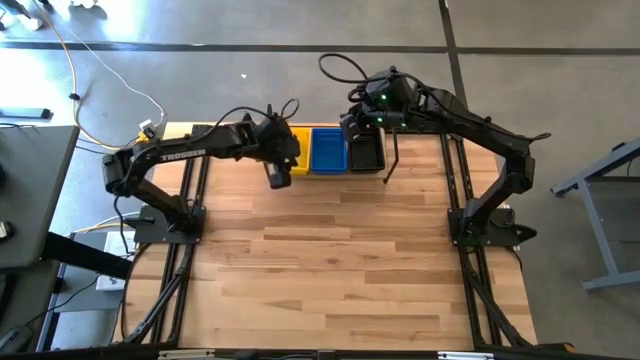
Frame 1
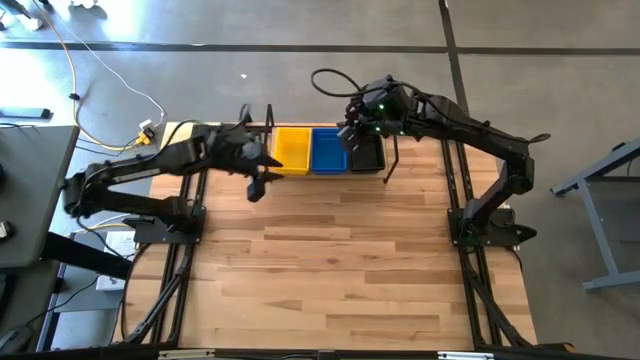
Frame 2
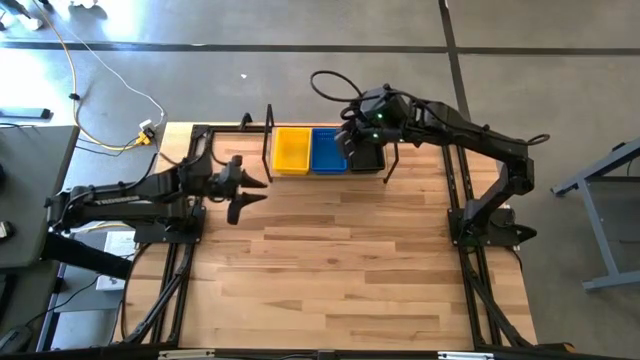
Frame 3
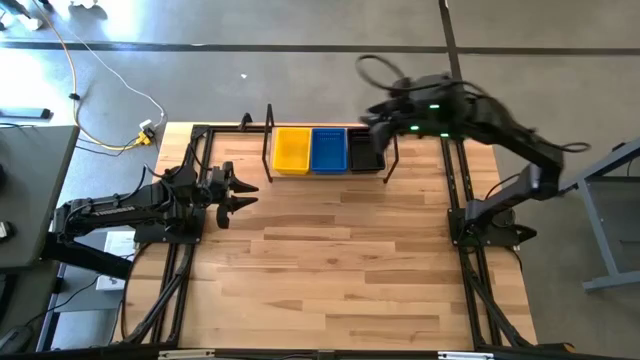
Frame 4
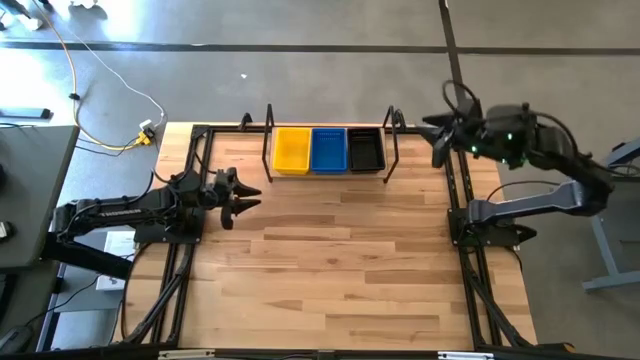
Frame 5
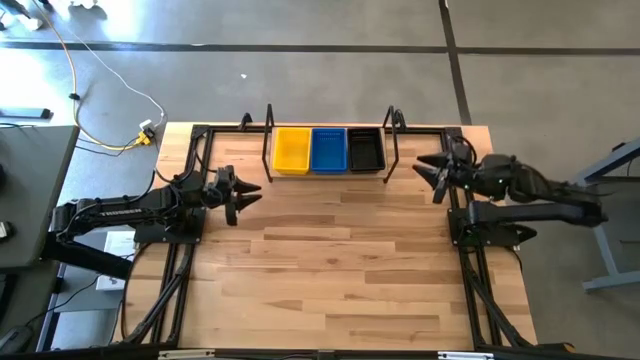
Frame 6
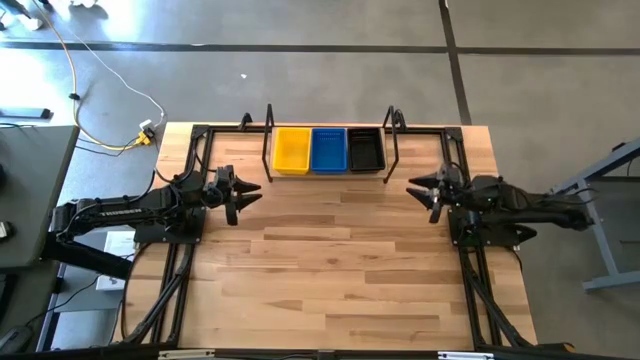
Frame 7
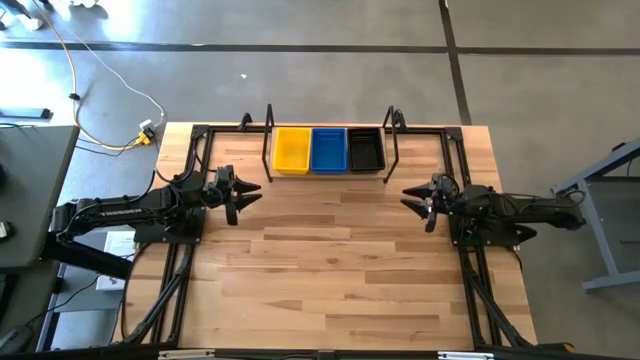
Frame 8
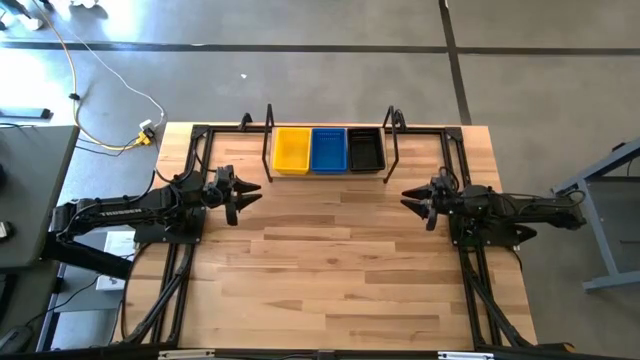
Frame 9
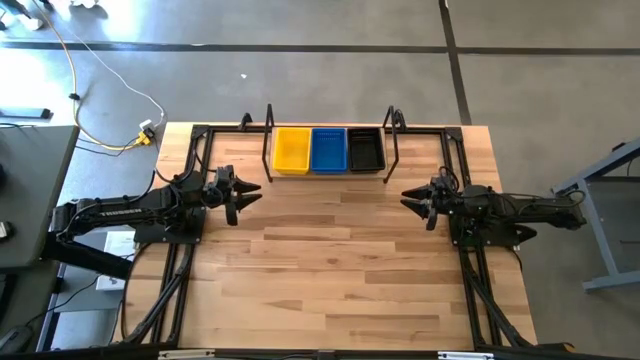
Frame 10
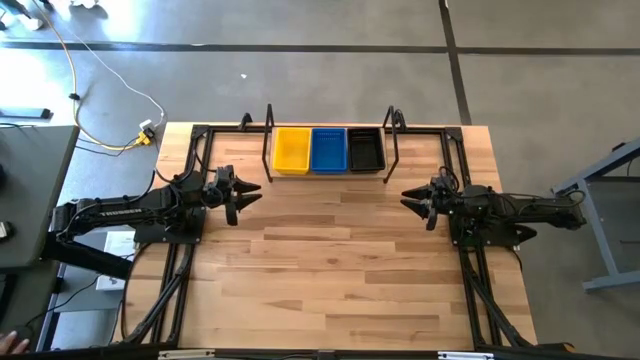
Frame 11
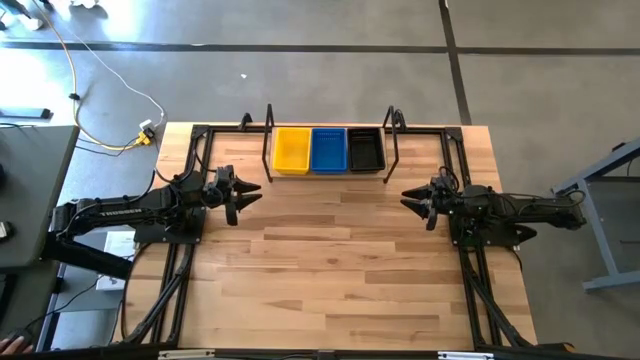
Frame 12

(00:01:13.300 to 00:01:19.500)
Task: Stack baskets on shelf by color
Return to Home Position

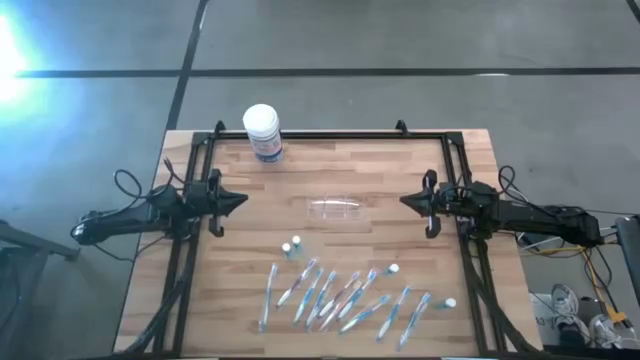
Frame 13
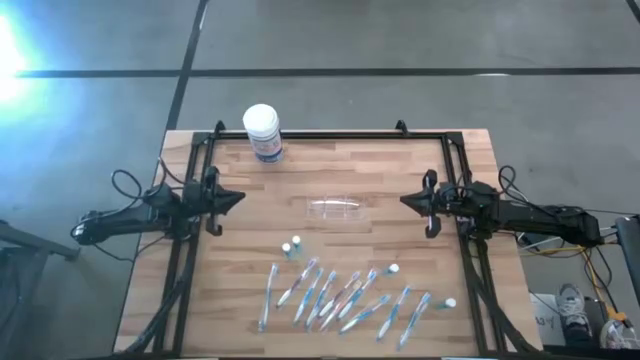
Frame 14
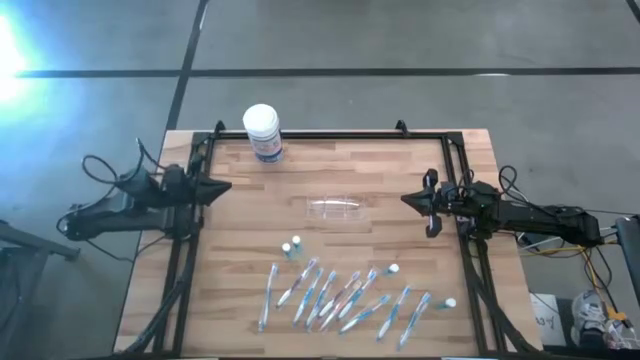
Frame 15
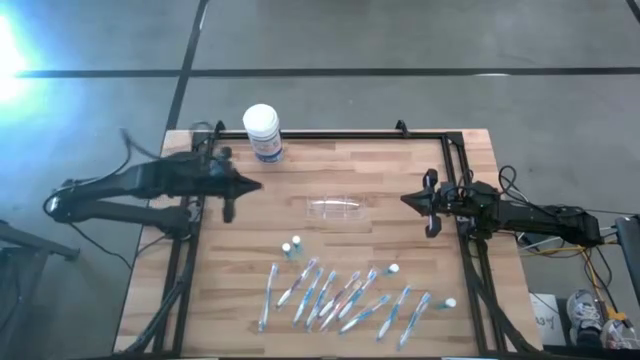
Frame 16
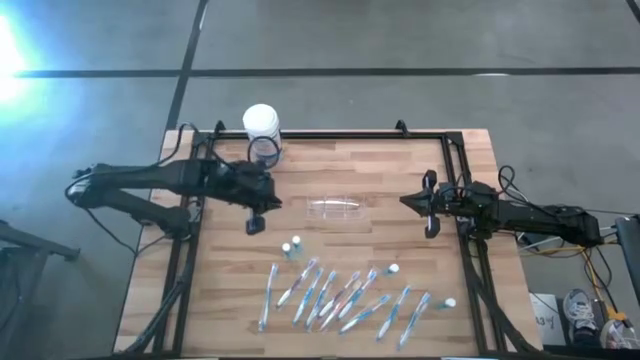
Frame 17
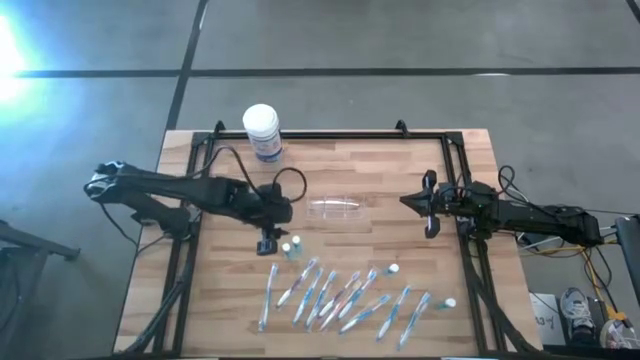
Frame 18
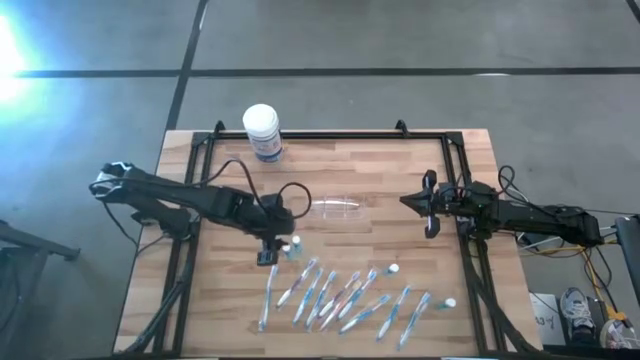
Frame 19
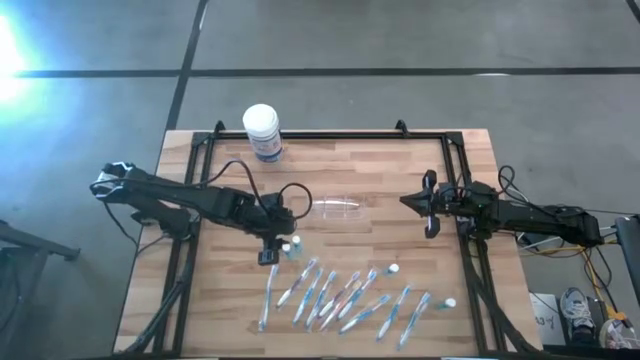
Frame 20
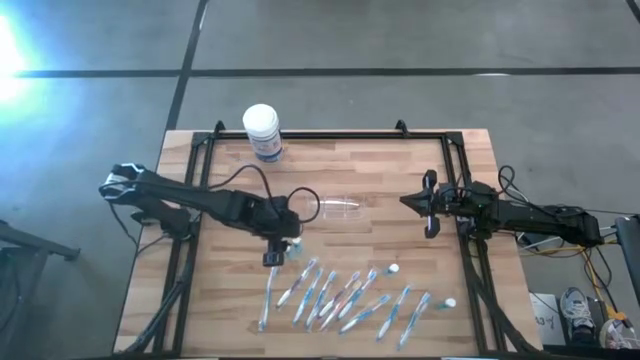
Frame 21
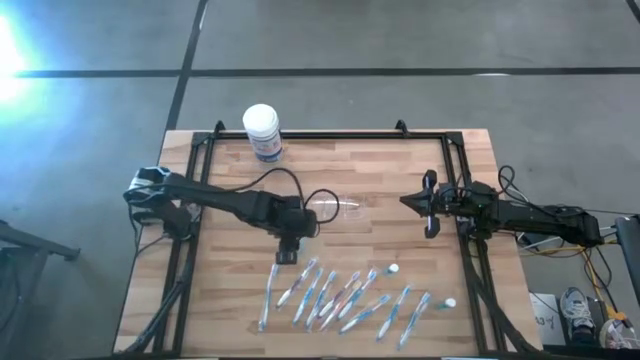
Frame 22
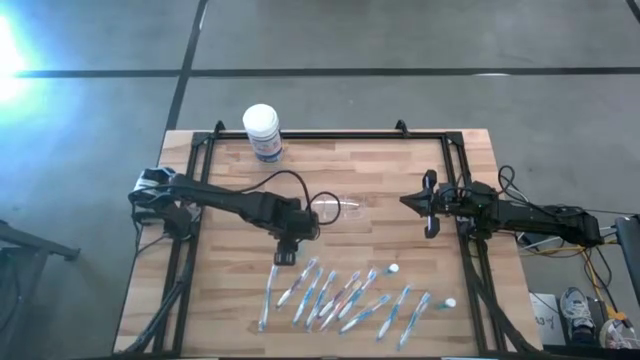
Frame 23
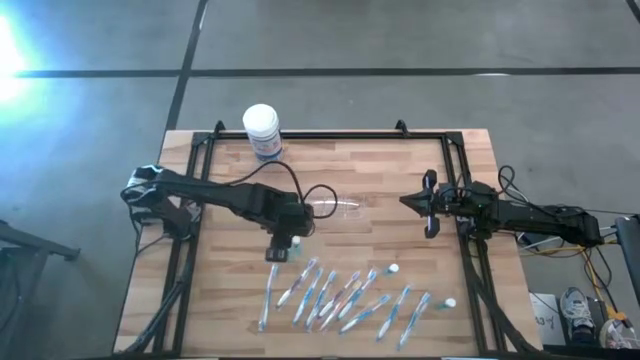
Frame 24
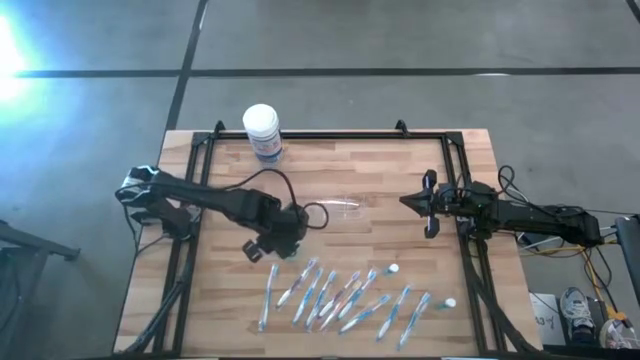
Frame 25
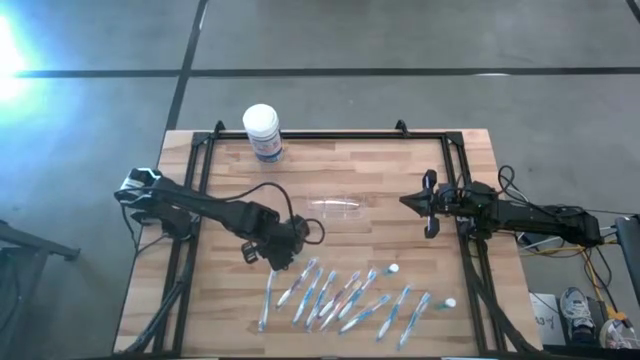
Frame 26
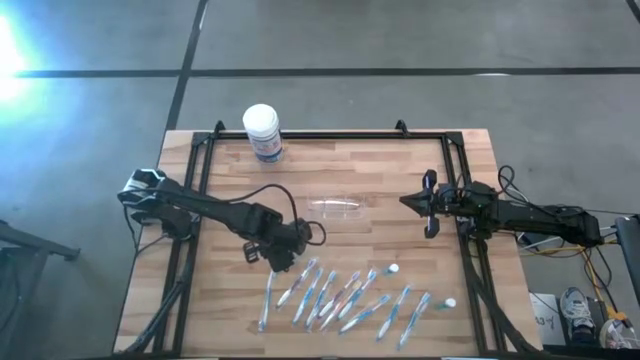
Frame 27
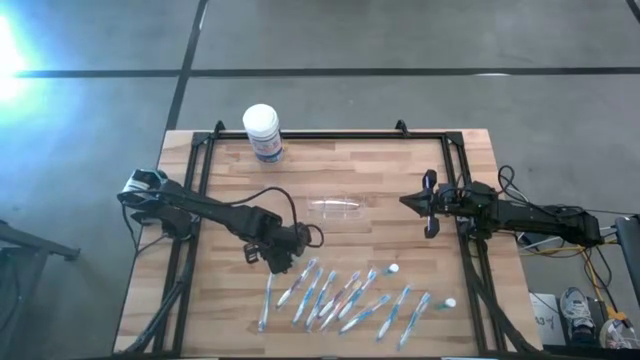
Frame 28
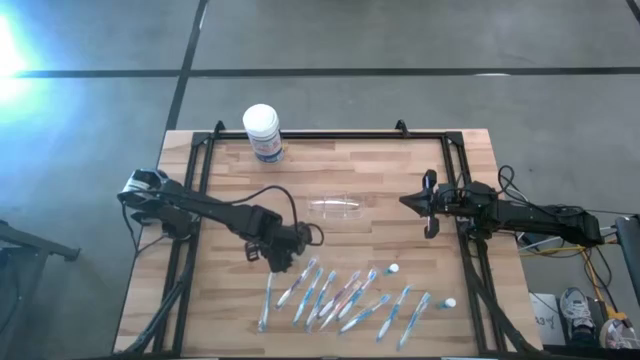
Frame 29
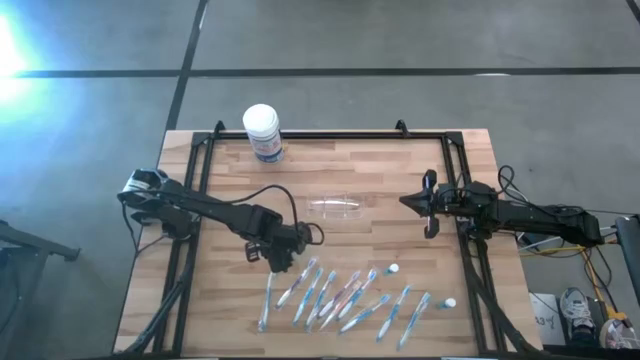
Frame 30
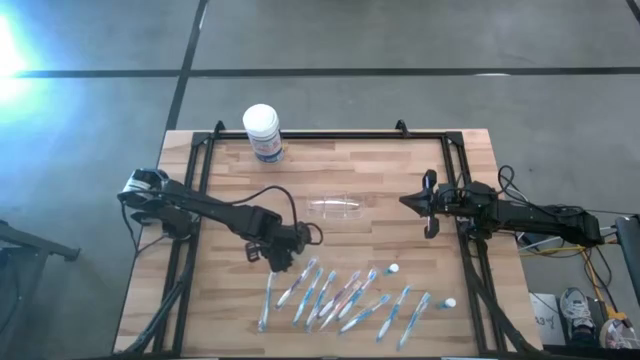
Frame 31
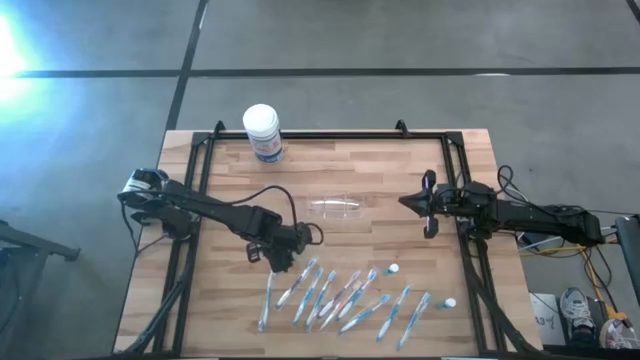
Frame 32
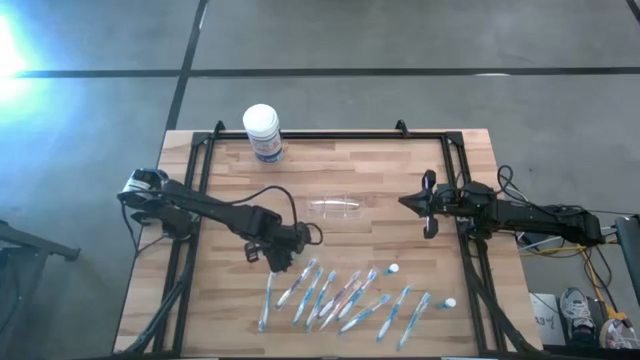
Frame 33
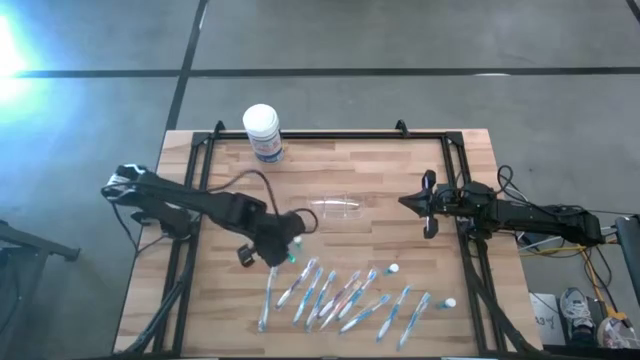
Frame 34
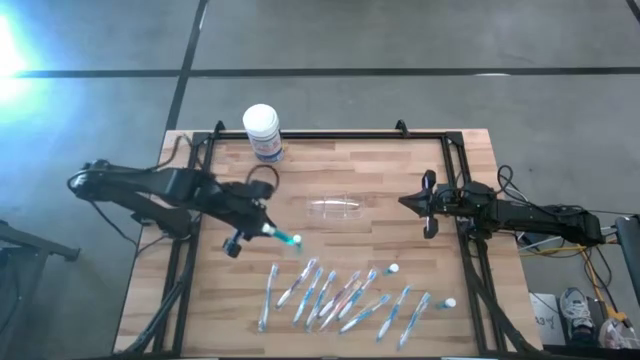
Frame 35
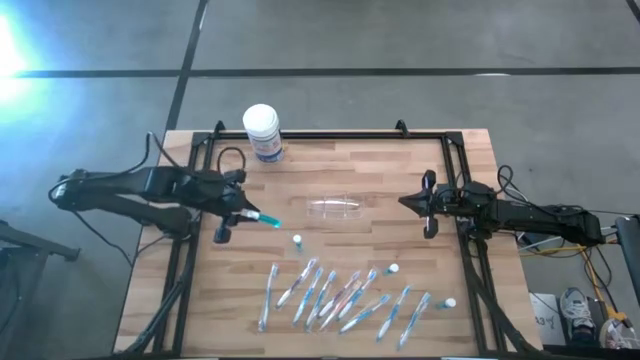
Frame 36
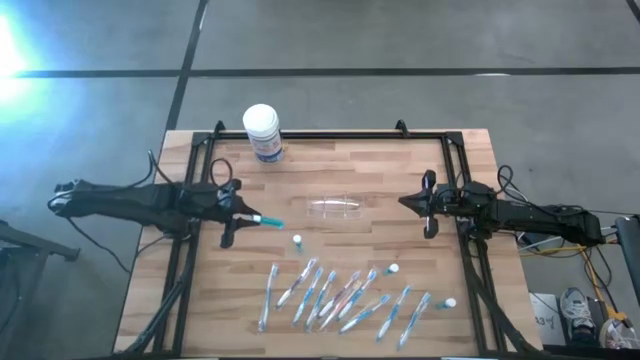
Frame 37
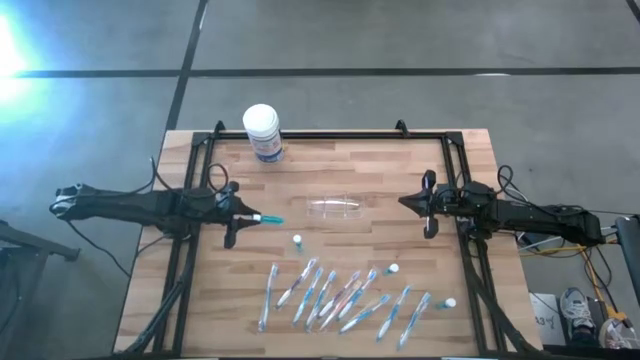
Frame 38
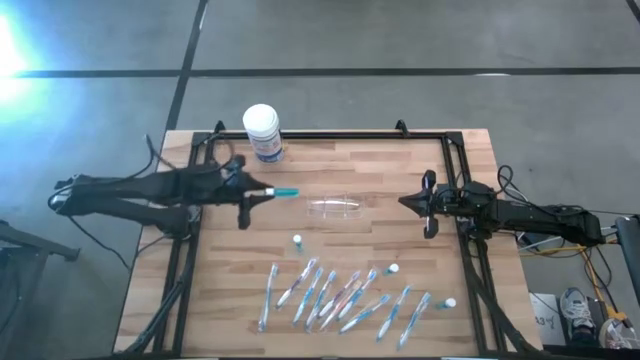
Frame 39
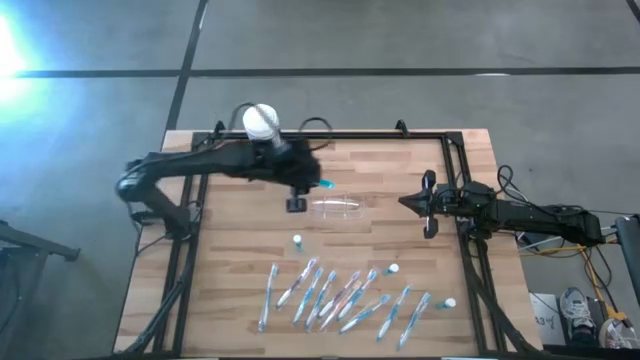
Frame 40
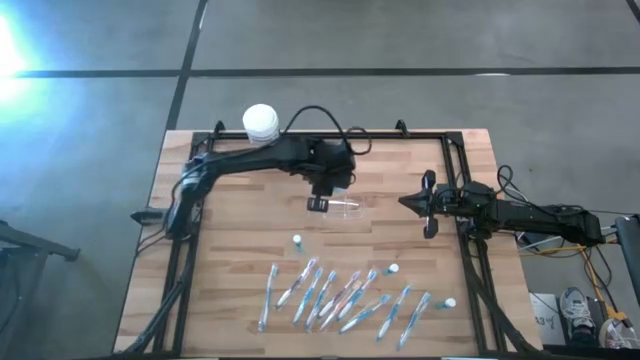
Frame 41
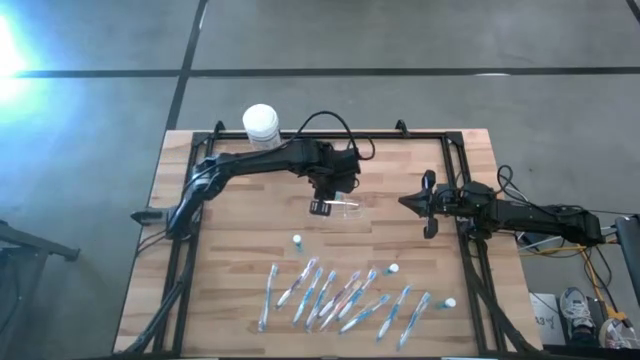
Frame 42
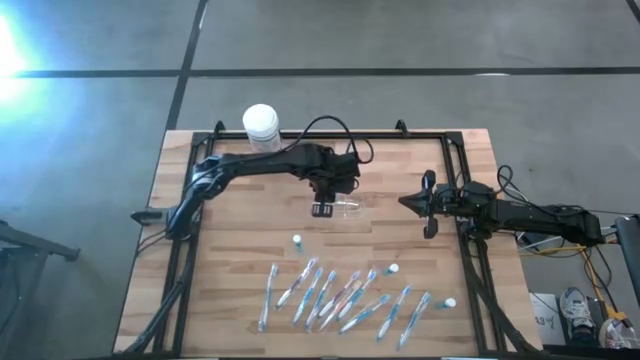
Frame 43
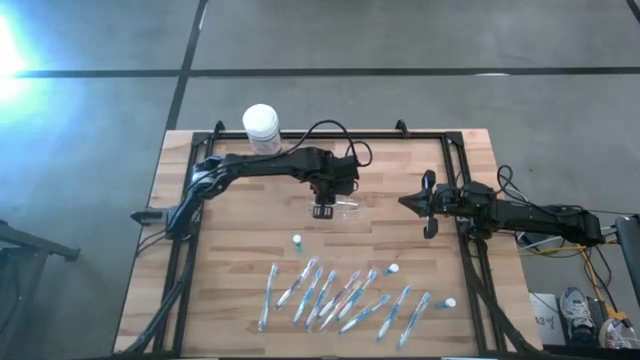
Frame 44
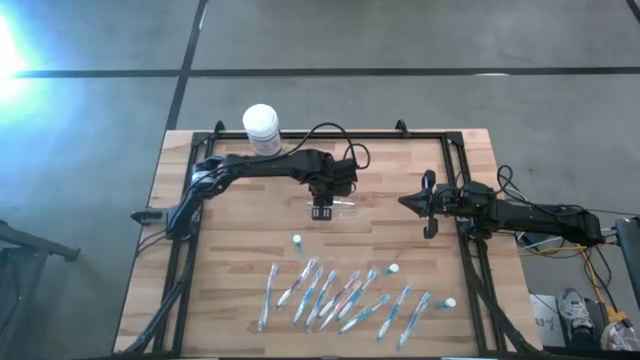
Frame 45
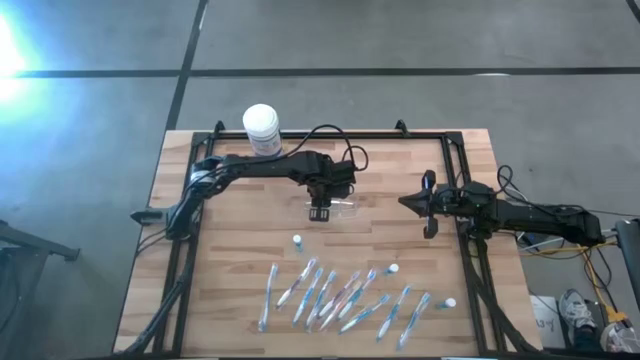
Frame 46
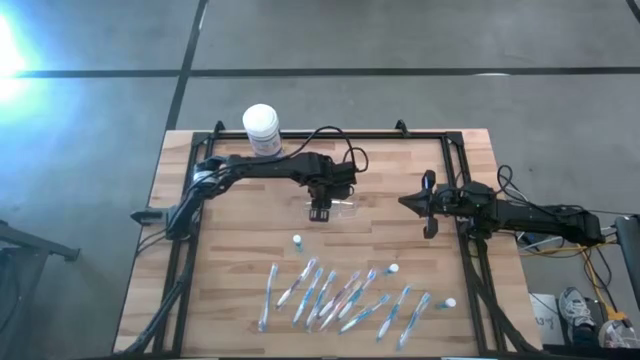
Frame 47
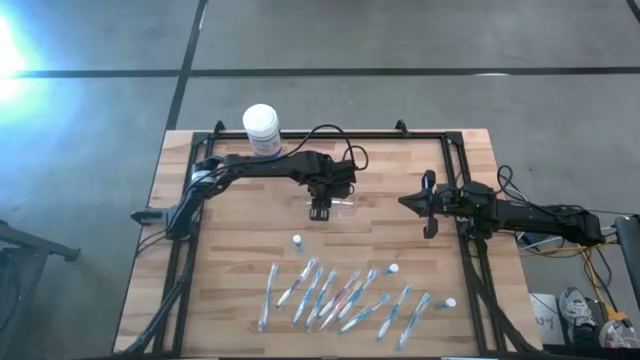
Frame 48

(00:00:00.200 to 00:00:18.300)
Task: Pick & Place toothbrushing station
Put the blue mouthwash into the transparent bin organizer
